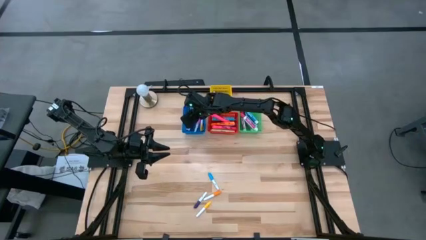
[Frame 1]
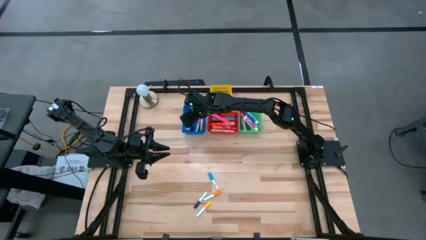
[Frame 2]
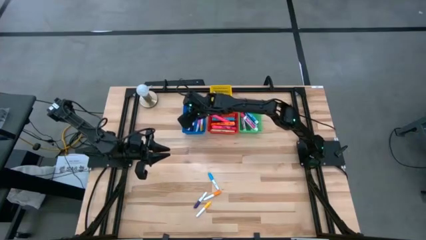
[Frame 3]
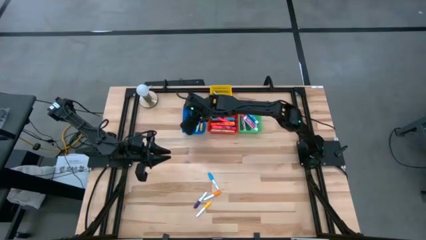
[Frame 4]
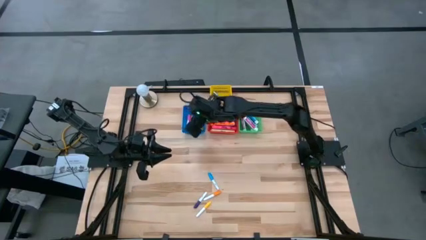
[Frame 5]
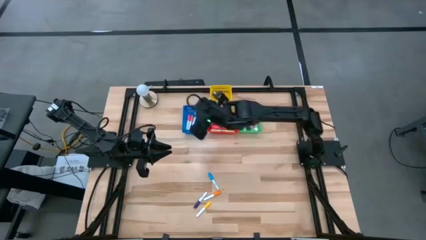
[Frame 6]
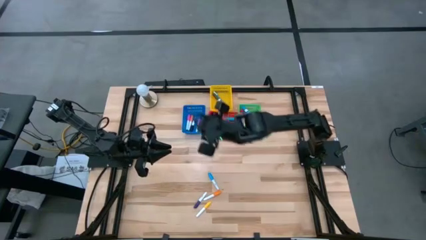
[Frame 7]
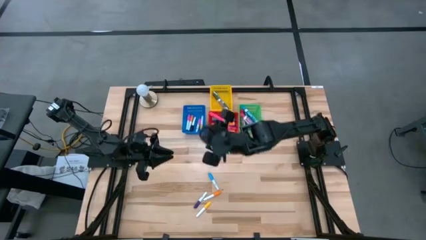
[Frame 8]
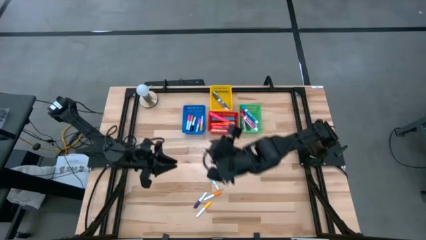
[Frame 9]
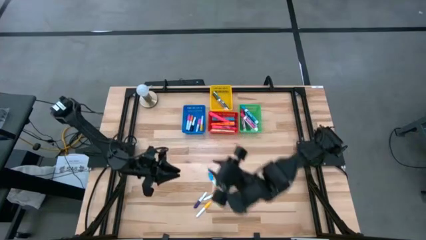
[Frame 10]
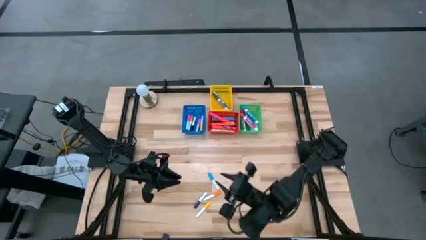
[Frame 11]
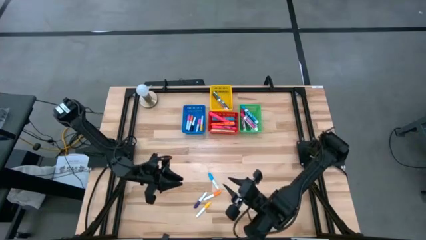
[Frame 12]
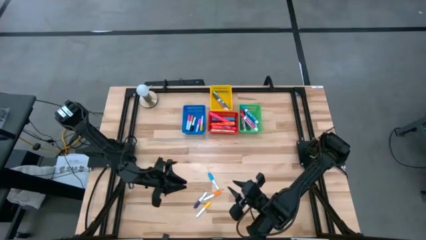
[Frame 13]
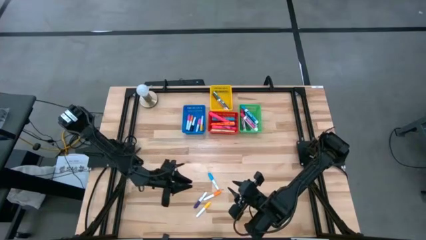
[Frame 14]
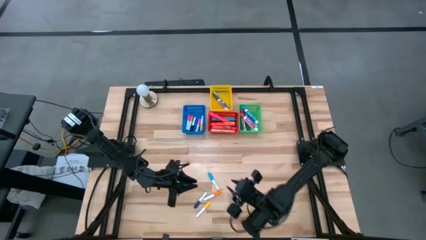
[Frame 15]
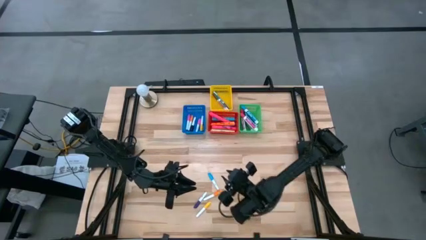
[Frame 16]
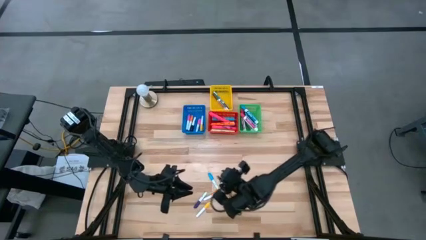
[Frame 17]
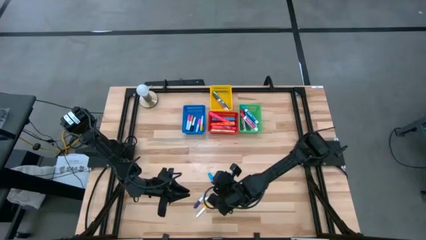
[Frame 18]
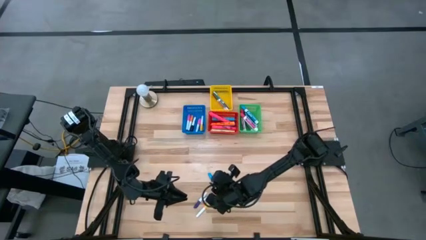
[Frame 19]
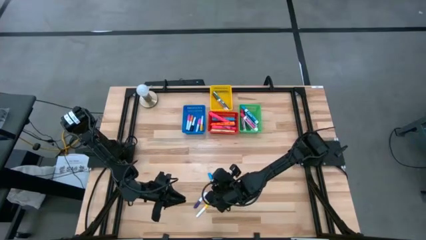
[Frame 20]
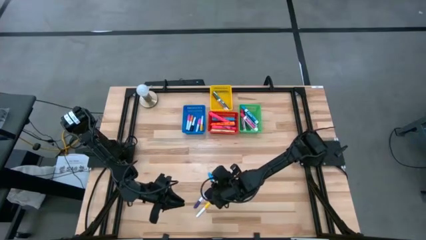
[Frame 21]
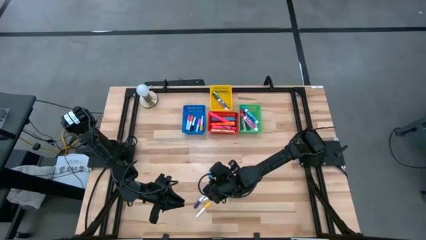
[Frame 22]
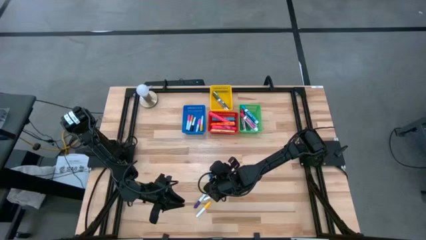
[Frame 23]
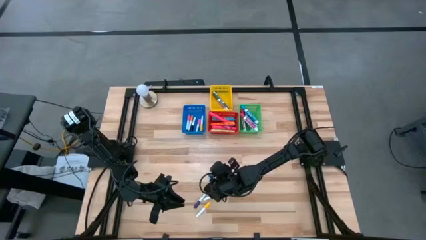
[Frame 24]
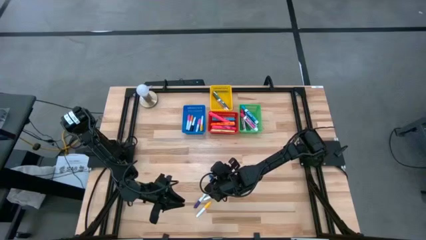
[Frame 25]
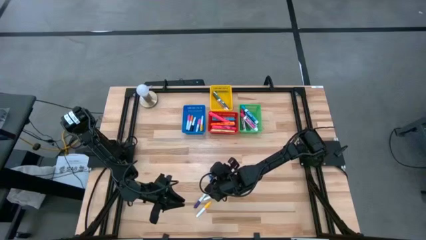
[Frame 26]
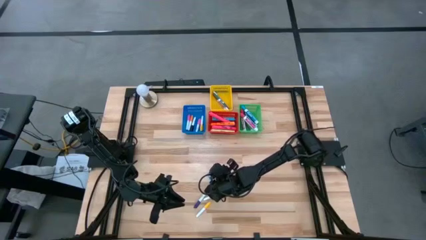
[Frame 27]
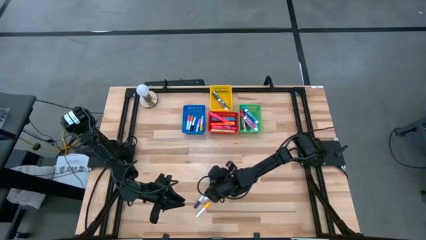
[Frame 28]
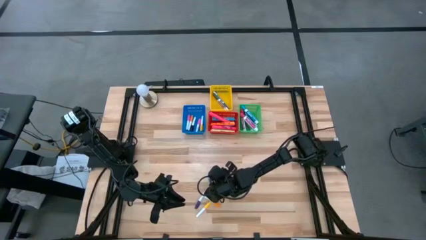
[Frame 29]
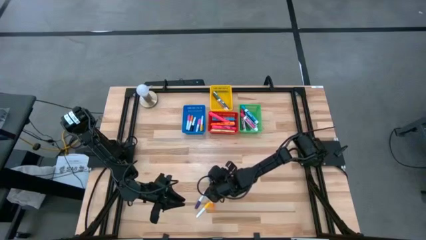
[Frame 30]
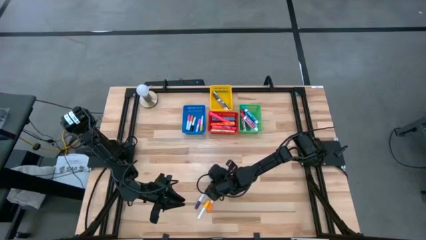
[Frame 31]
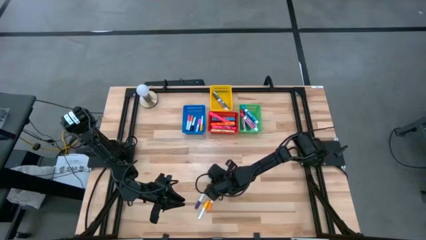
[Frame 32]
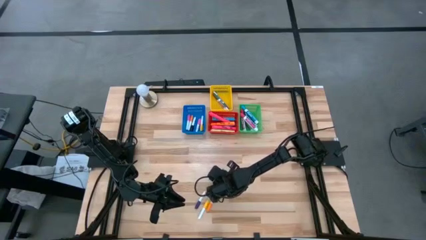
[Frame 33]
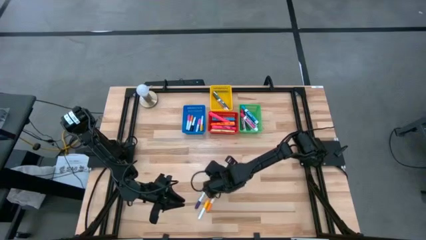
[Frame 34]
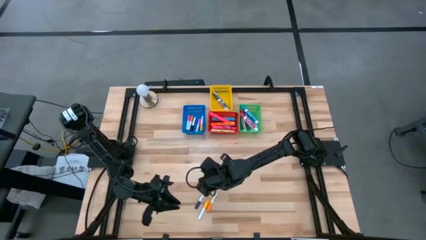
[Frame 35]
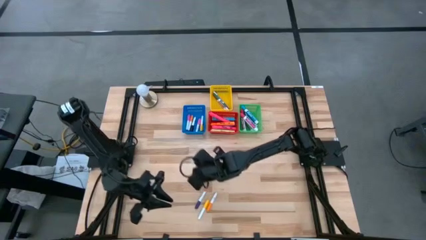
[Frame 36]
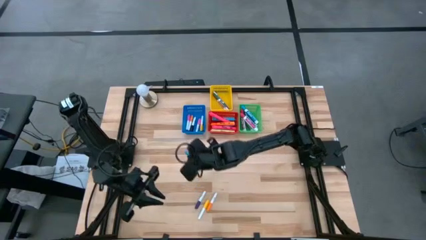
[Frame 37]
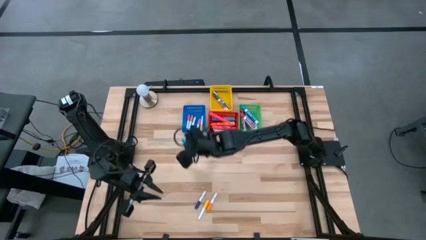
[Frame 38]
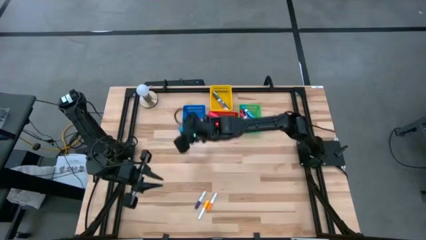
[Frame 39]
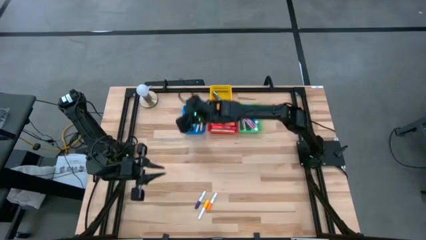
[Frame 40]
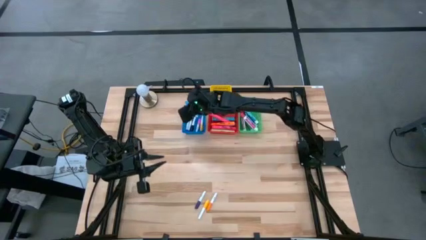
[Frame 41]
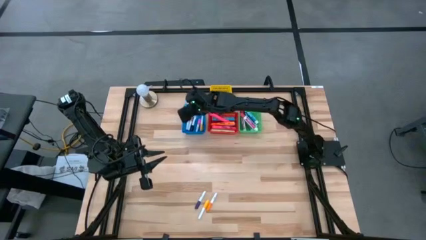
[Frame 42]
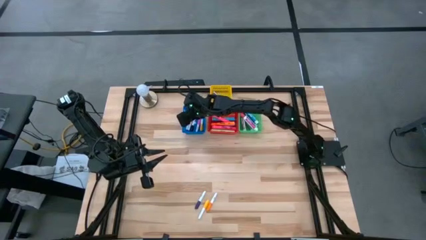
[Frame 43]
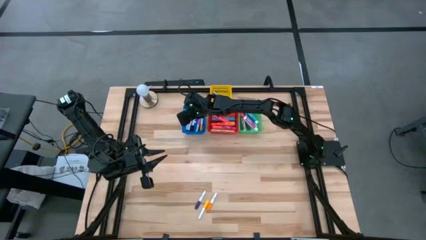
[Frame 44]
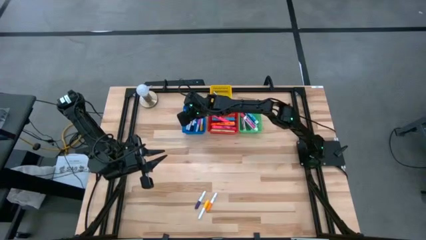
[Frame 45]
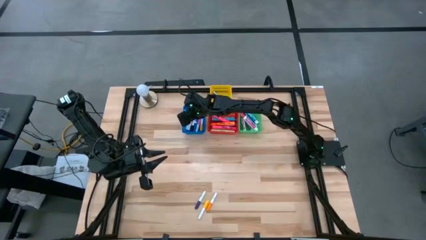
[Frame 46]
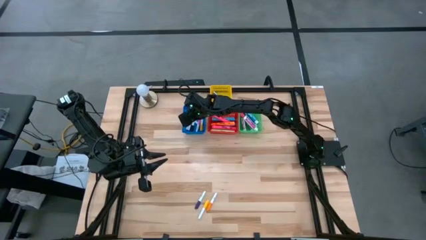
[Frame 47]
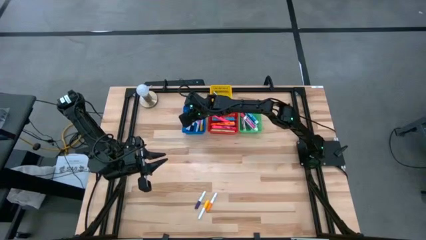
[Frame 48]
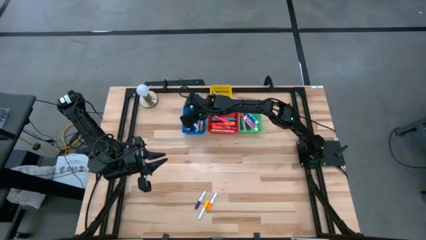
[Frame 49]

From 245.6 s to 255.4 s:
Task: Pick & Place Markers
Put the small blue highlighter pen into the blue bin

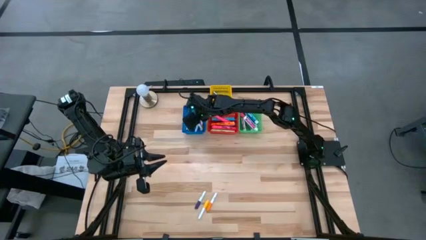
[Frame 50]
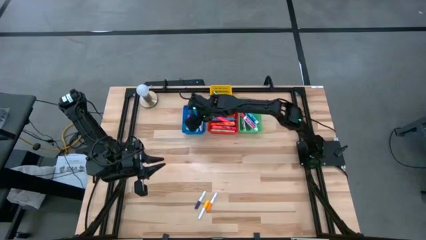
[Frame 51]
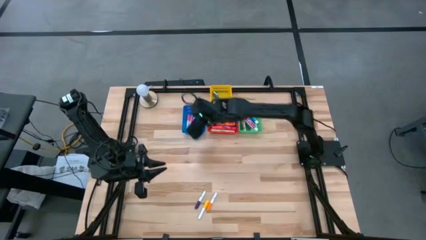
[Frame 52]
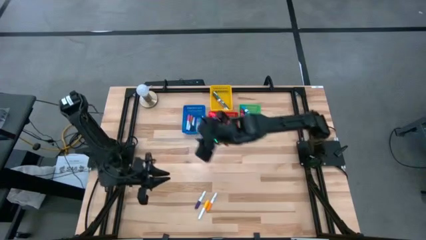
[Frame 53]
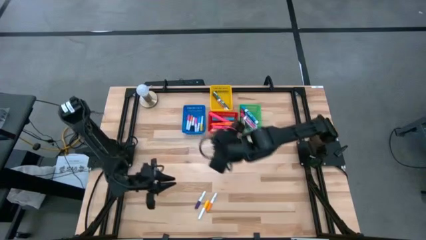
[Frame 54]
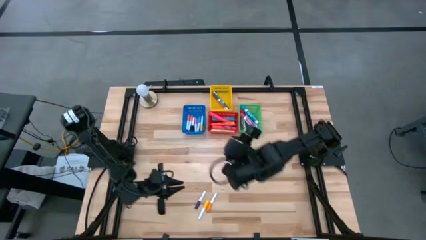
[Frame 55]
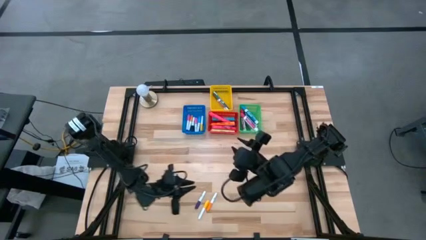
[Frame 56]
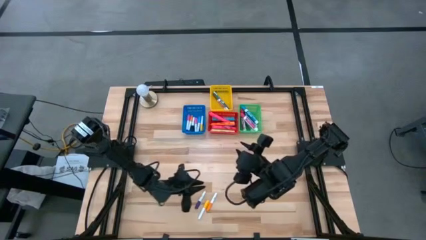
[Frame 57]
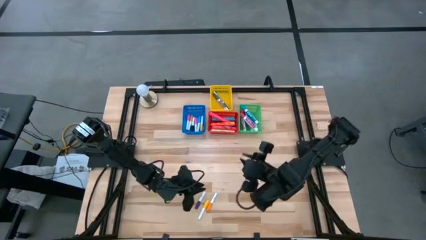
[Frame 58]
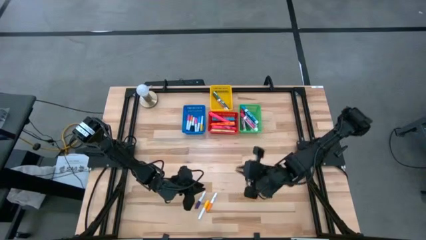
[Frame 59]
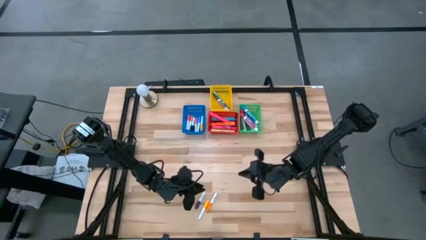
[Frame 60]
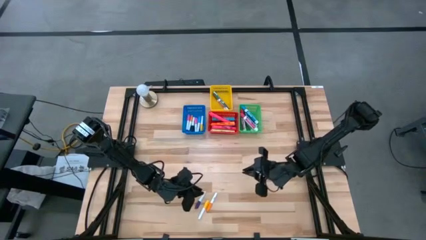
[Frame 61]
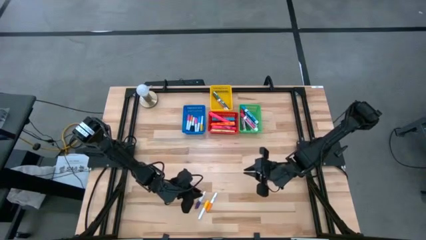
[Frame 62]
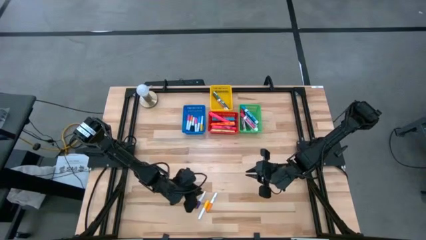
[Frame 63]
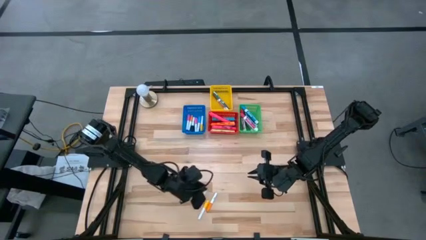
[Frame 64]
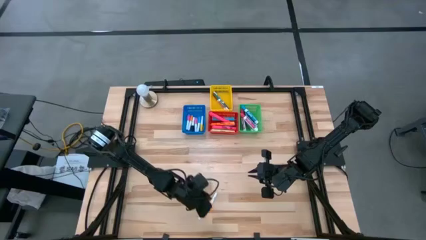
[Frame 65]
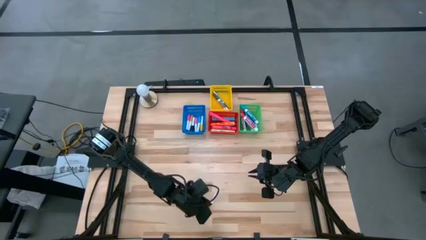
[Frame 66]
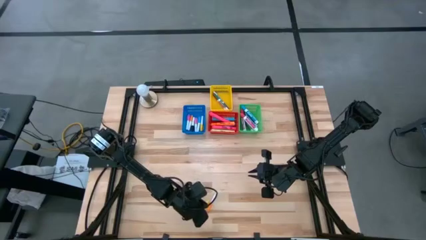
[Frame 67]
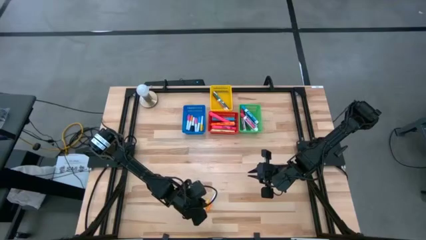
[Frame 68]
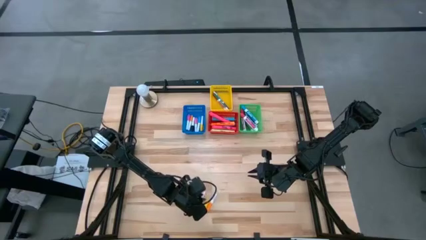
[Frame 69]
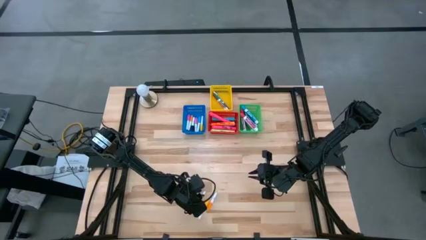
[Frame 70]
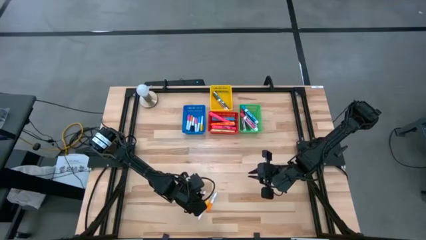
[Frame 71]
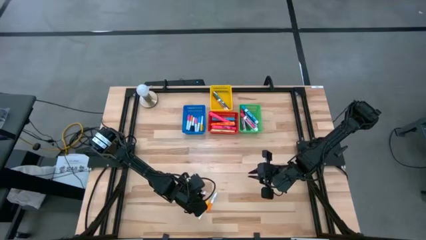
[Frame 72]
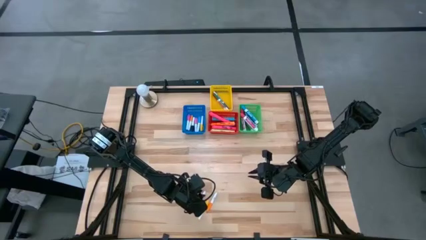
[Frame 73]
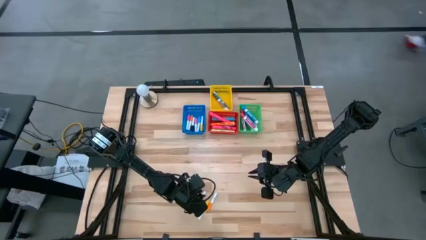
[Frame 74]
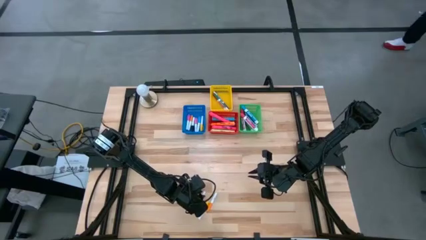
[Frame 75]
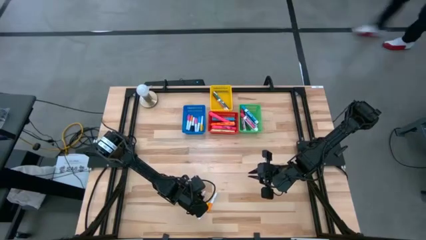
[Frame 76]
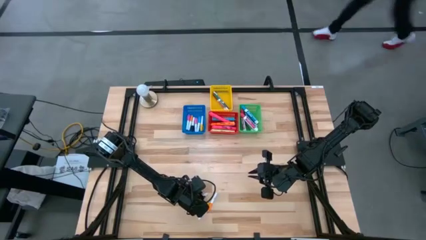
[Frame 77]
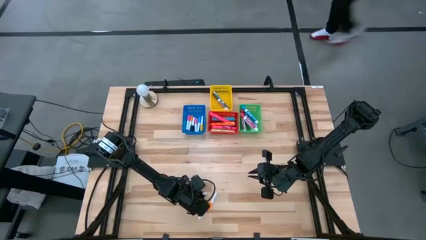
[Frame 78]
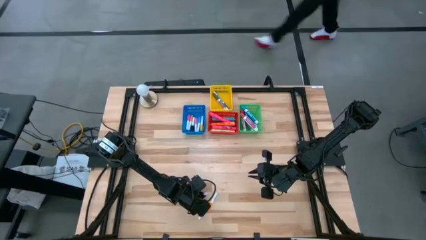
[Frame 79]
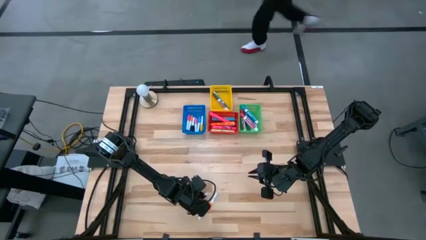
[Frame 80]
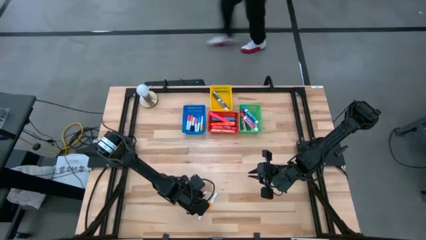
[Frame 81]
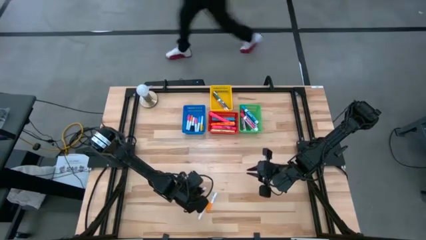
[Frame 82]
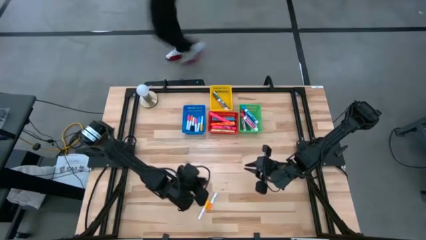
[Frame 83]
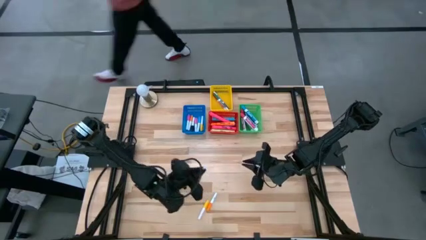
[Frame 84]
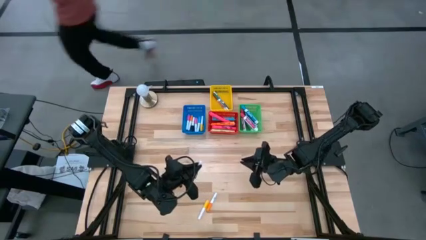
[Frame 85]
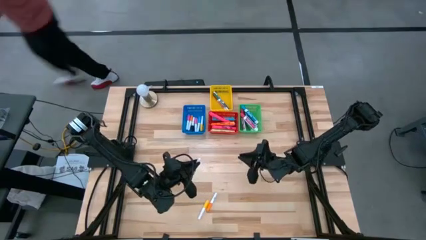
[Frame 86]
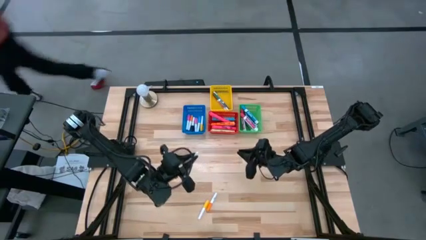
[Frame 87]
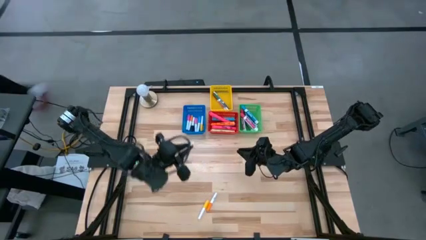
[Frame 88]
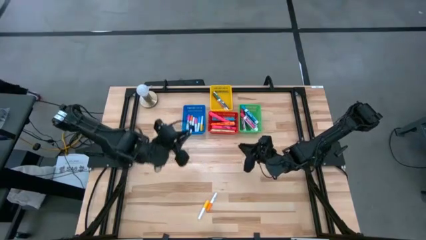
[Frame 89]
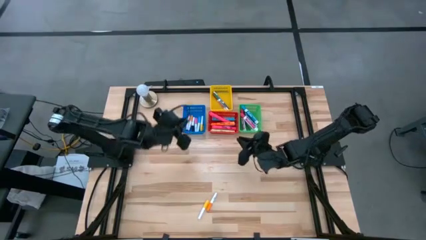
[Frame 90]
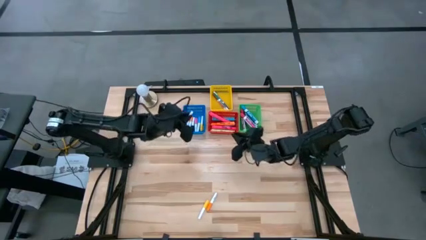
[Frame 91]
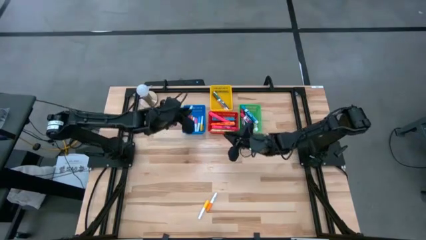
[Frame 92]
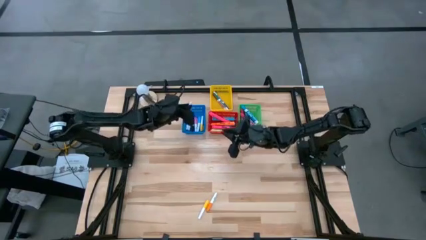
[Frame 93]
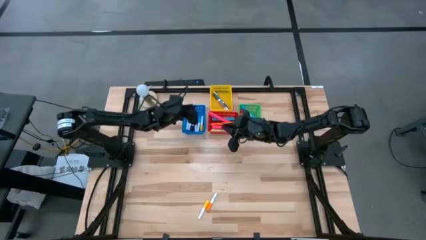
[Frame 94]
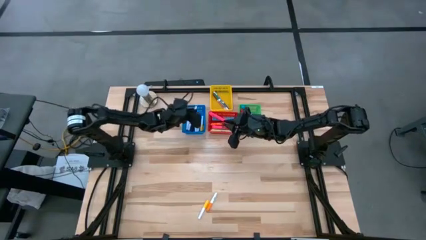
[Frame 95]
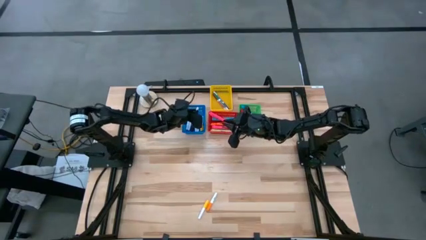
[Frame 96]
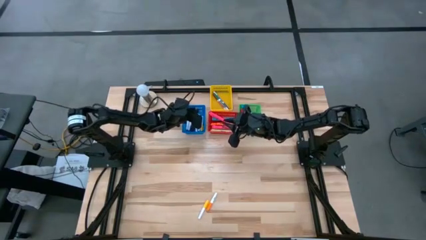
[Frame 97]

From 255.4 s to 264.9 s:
Put the small purple highlighter pen into the blue bin
